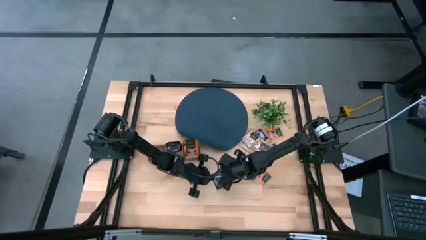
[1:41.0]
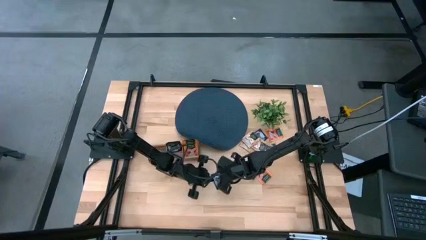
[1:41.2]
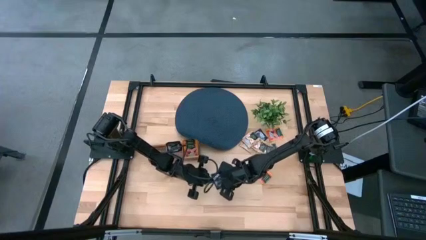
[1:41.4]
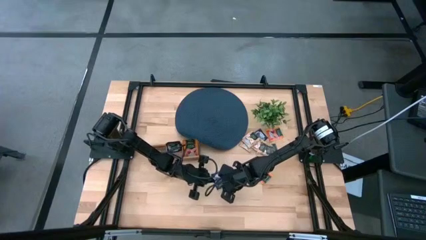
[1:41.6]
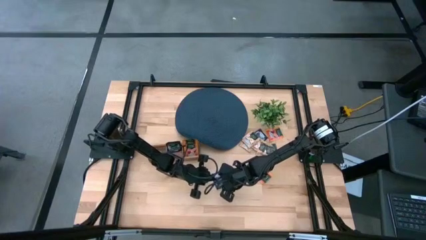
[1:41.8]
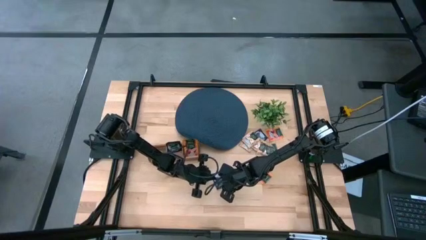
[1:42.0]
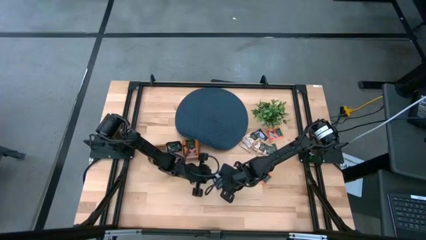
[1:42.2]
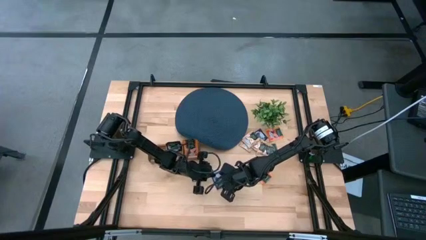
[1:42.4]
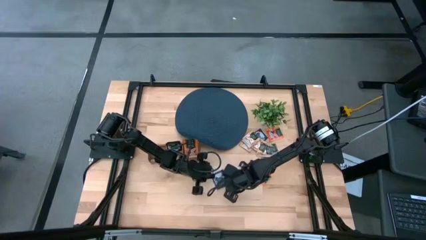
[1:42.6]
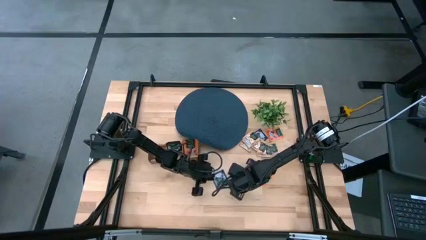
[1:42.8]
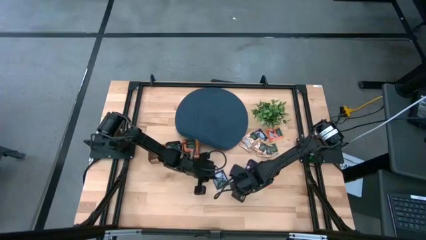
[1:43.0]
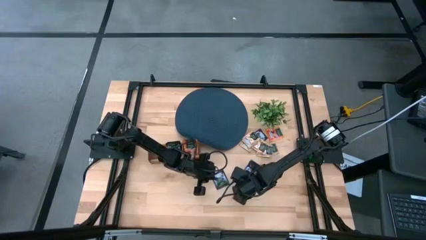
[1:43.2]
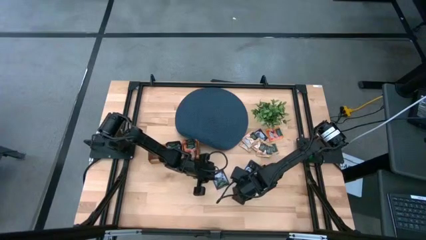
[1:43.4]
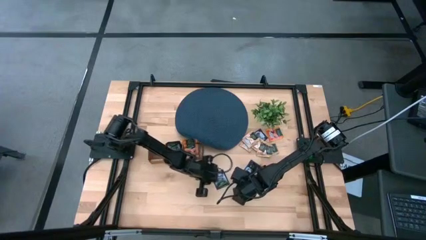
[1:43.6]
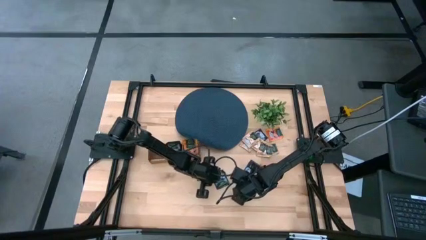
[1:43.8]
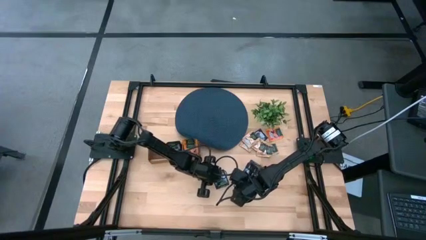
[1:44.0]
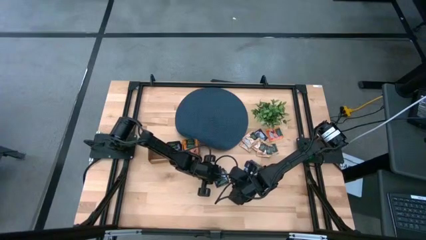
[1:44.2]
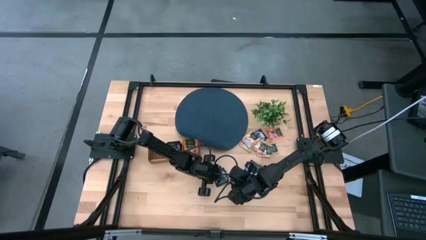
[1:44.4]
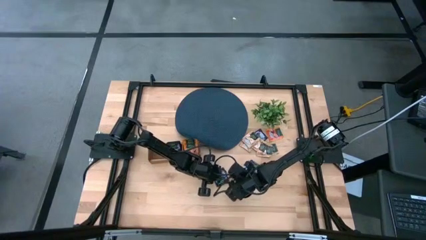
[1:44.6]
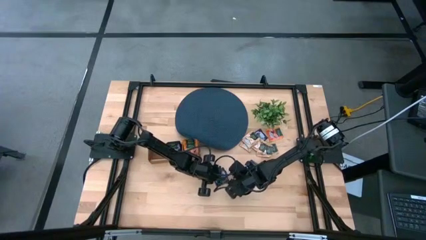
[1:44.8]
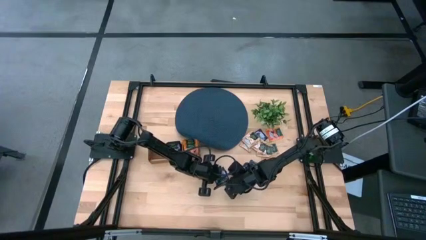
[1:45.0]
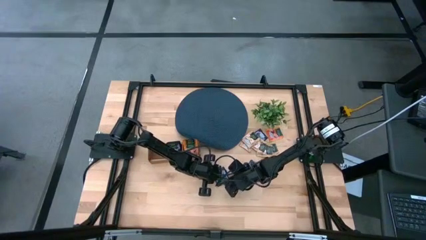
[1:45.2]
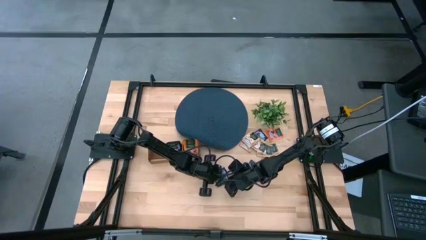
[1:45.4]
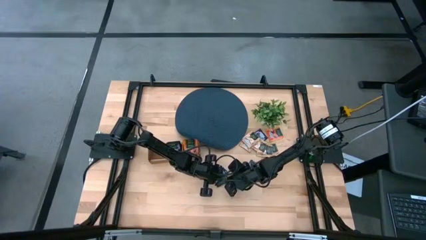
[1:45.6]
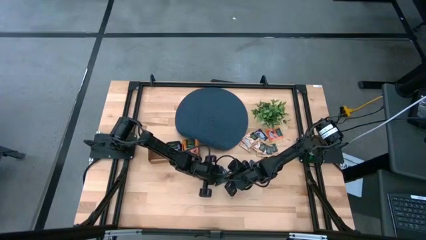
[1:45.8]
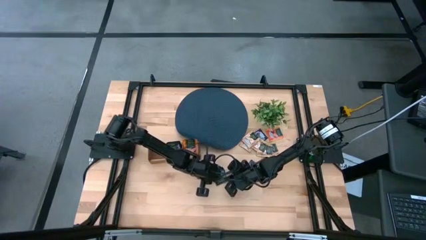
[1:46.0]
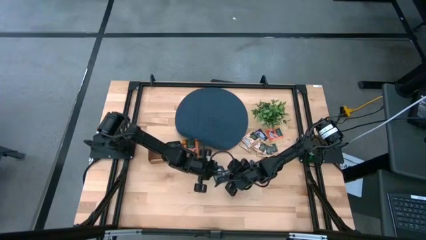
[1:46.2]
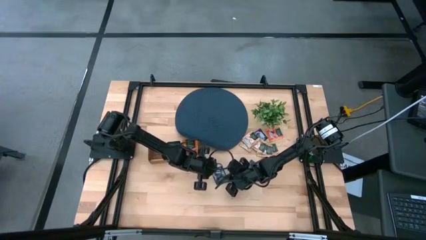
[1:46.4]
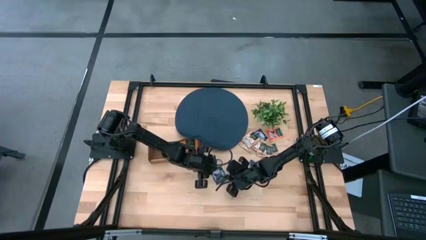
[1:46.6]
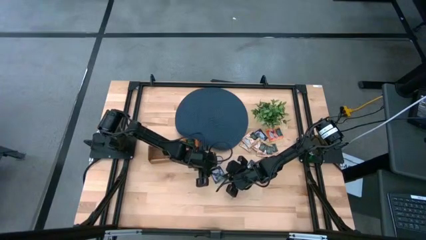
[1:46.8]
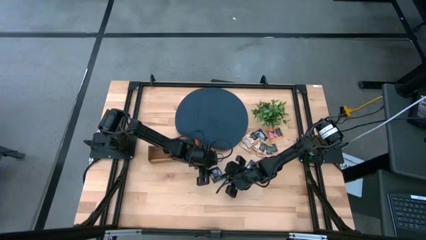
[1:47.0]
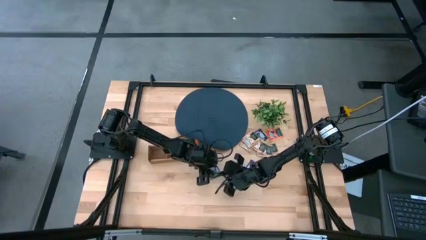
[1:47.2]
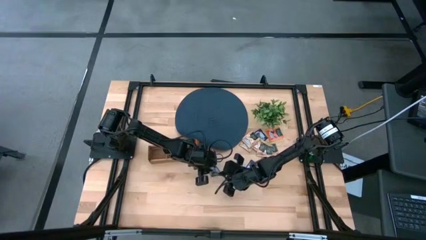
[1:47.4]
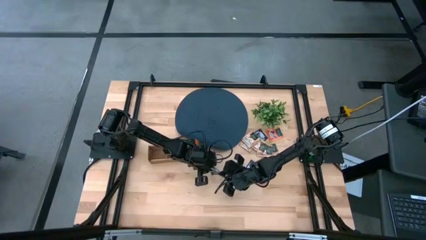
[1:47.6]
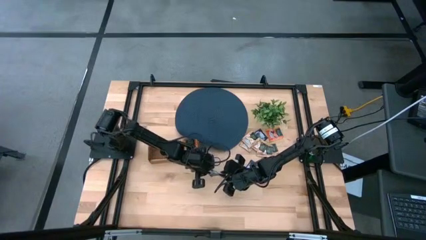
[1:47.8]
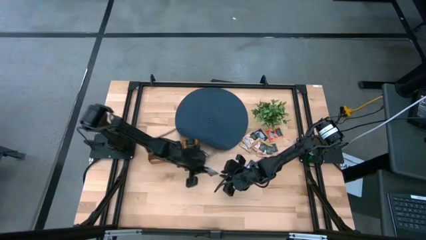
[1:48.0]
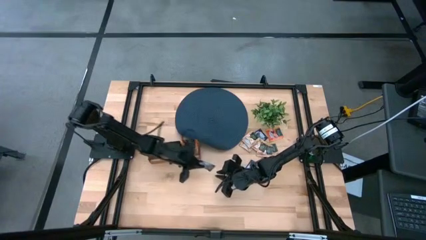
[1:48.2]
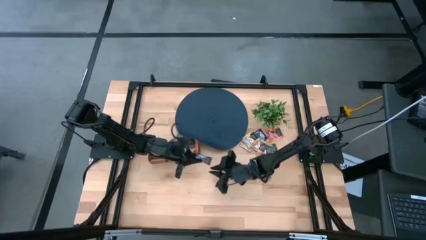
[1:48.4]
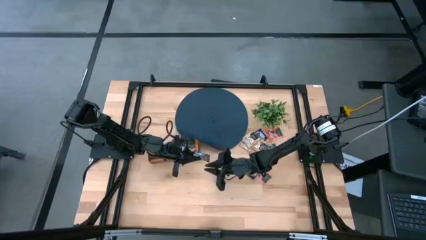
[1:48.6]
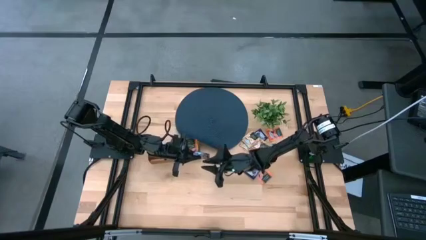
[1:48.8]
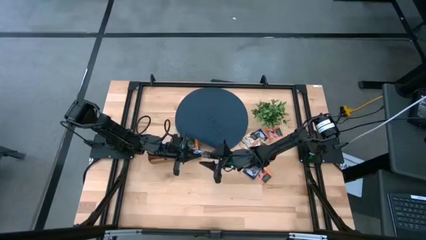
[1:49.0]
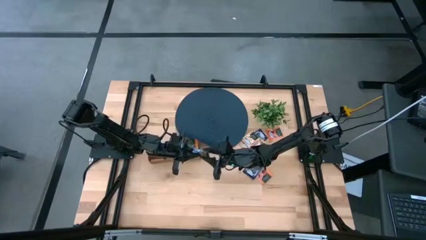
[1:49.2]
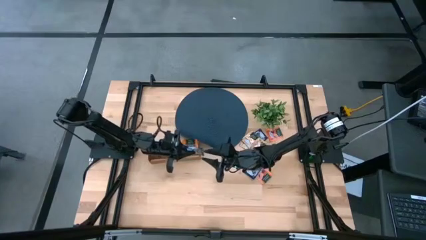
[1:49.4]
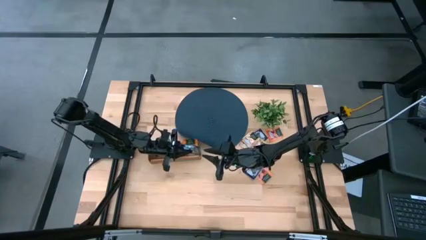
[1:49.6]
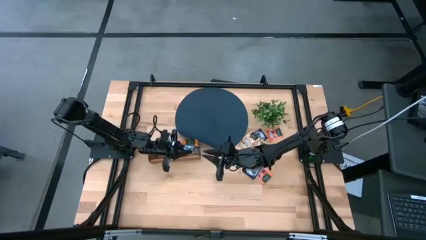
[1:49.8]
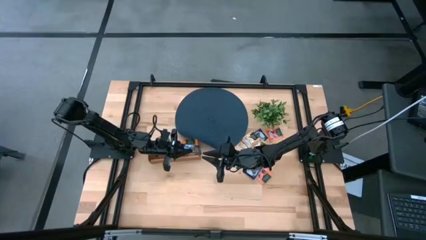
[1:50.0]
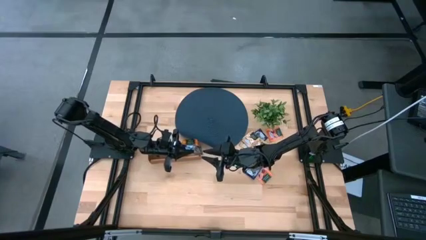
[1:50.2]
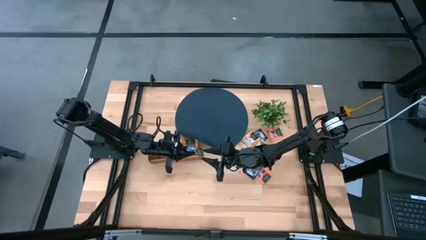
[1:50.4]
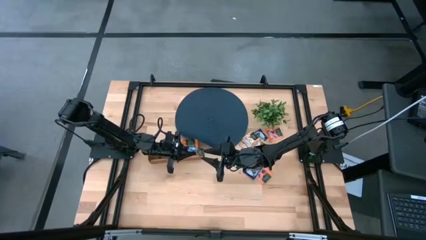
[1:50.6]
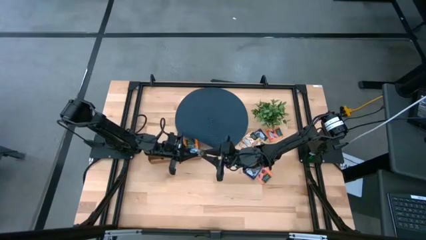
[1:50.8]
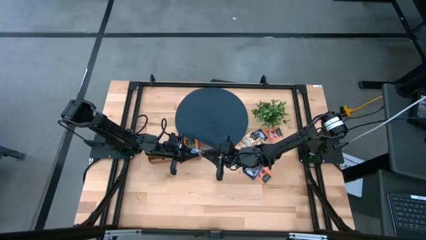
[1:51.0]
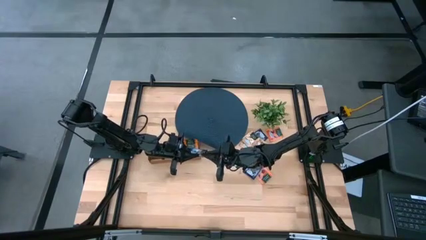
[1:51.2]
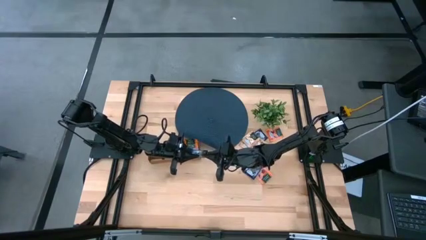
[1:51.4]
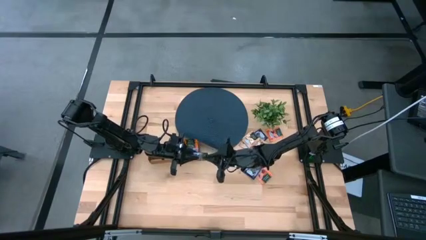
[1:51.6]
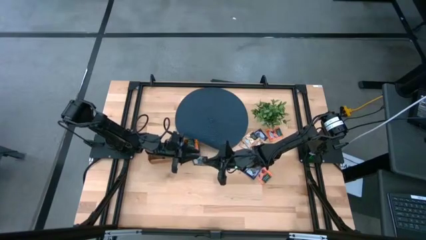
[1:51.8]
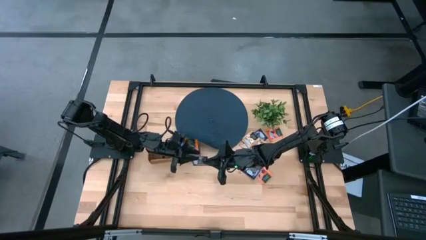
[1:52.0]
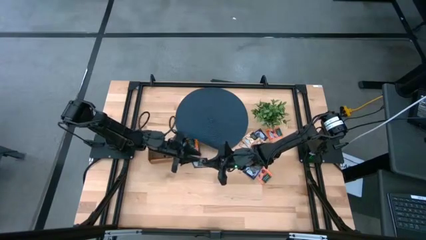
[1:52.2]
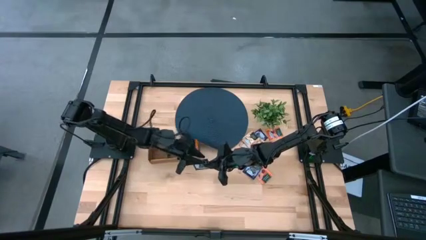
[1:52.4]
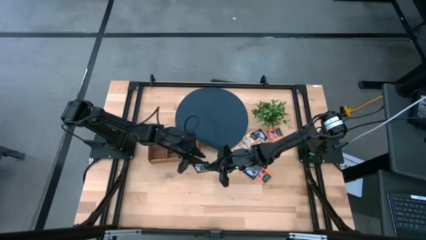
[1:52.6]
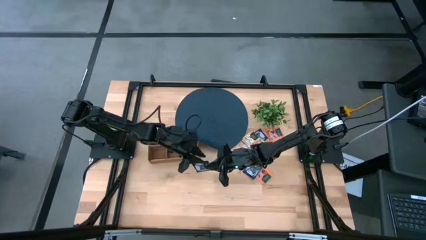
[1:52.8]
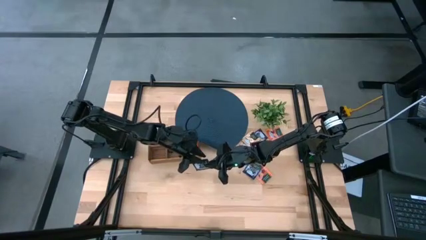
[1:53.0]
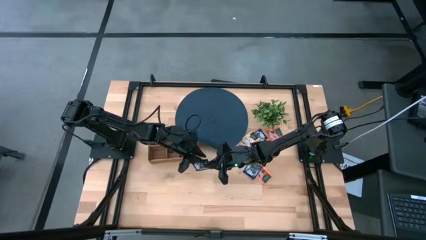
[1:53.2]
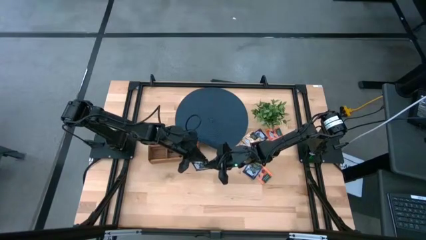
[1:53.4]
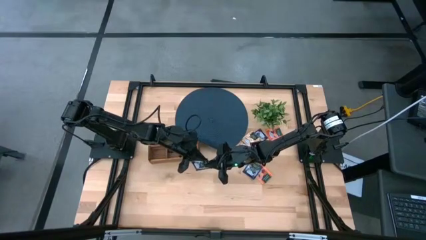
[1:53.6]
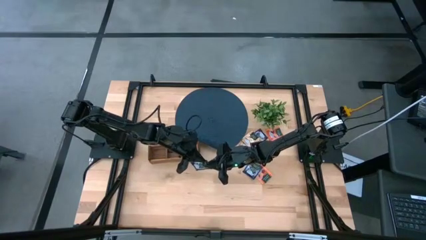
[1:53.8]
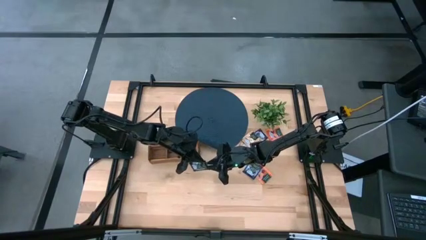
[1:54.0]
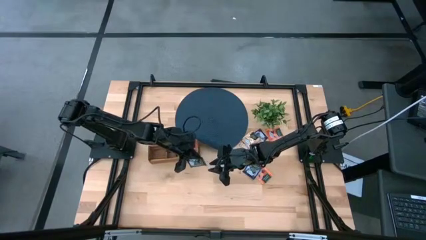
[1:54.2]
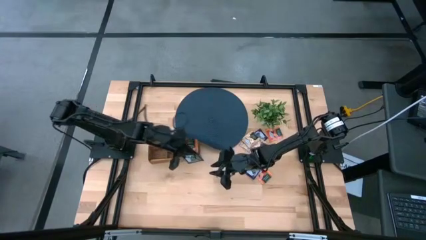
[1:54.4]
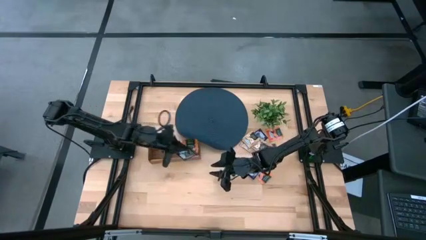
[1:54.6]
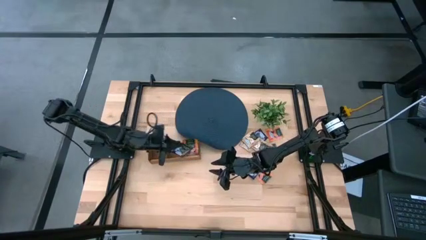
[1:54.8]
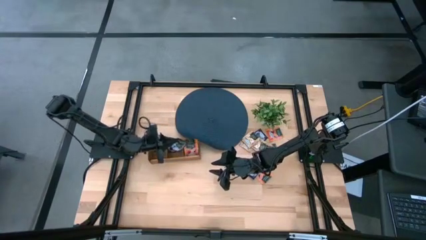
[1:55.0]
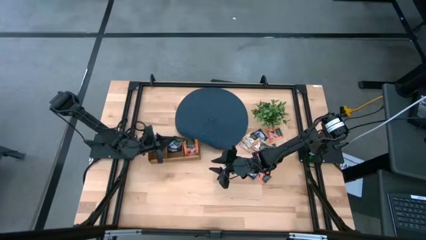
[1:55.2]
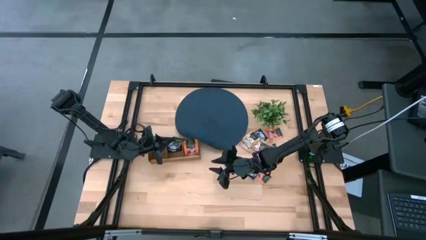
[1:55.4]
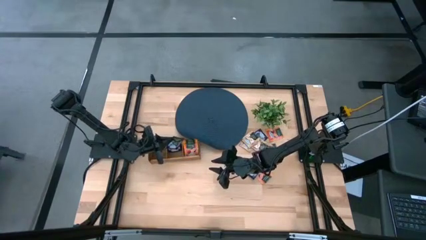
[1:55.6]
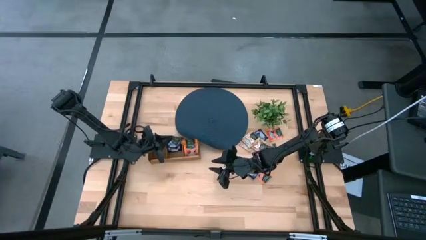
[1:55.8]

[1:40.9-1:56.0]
Task: Pick & Place Tea
Put the blue tea bag into the middle section of the wooden organizer

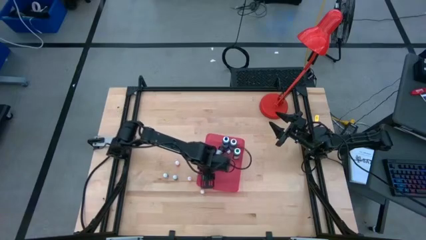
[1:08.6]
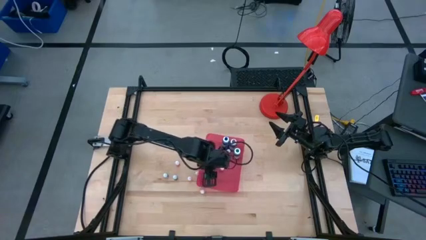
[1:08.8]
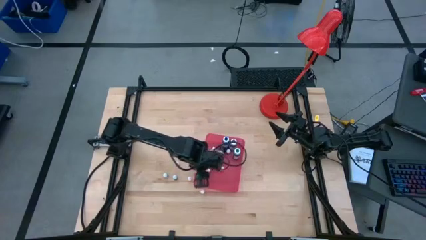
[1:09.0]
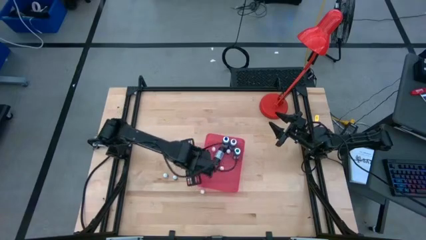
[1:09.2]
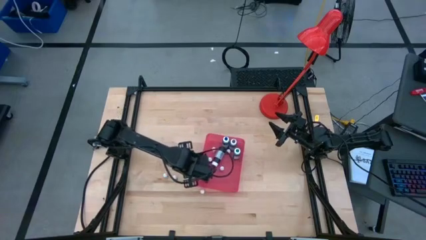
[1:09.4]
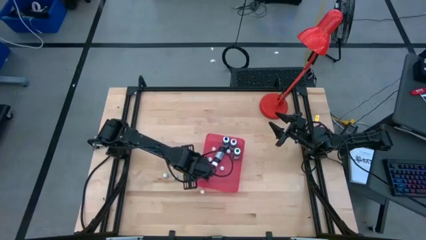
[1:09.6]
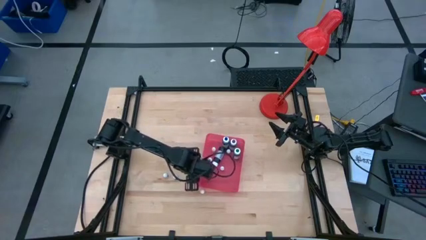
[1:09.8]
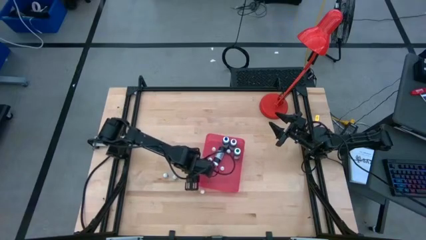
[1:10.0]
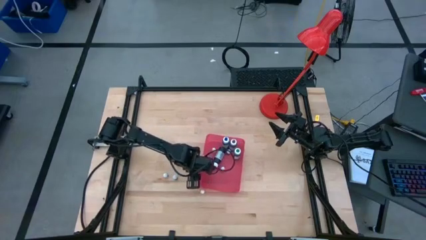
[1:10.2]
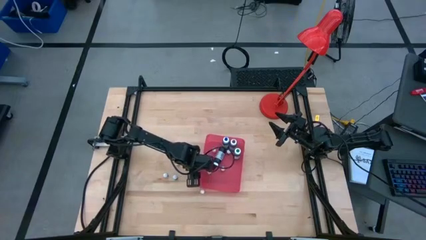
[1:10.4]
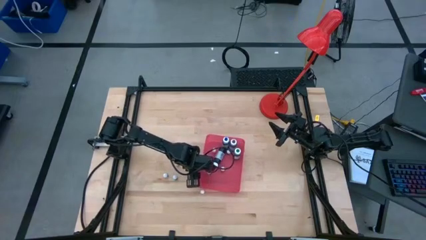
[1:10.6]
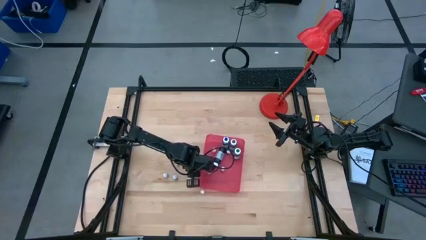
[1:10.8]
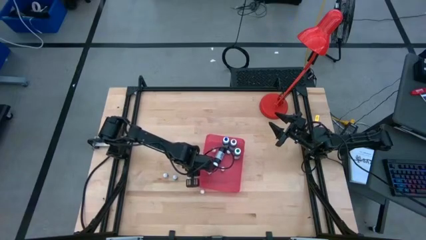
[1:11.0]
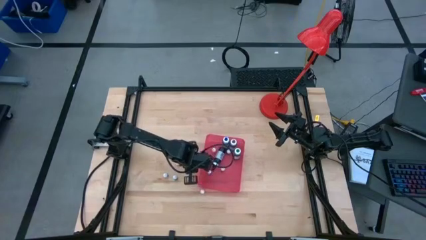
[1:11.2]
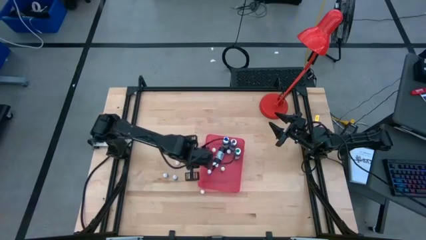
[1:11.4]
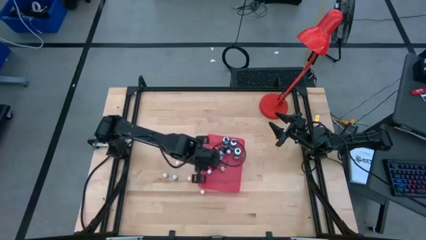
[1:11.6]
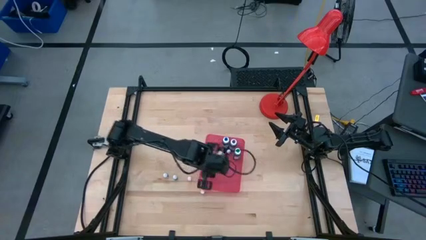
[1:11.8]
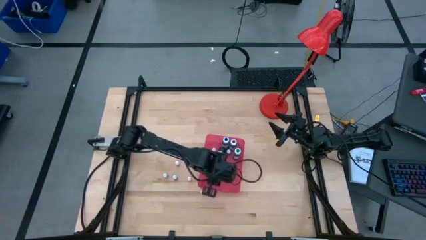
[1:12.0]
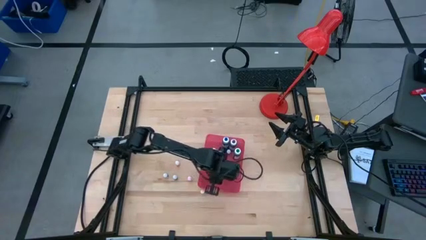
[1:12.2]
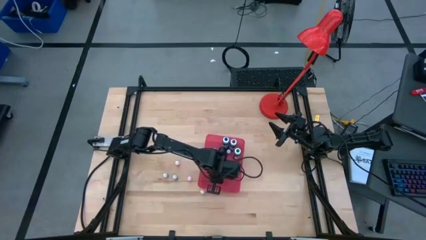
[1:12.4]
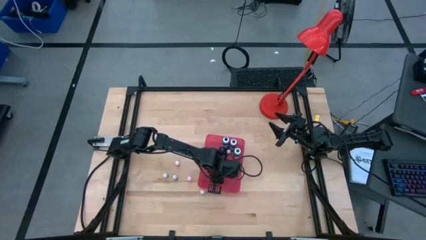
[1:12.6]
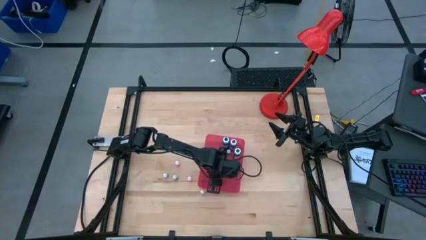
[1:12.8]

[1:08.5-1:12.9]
Task: Pick & Place food coloring
Put the small black food coloring bottle into the red bin
